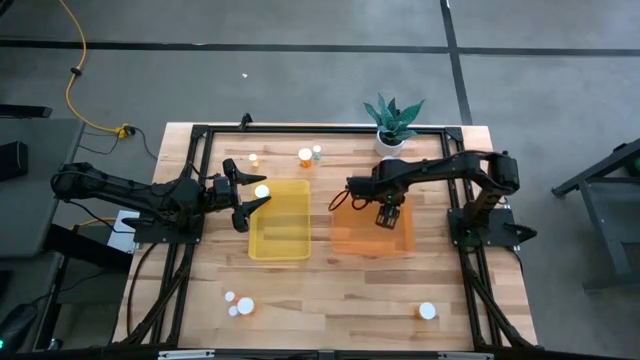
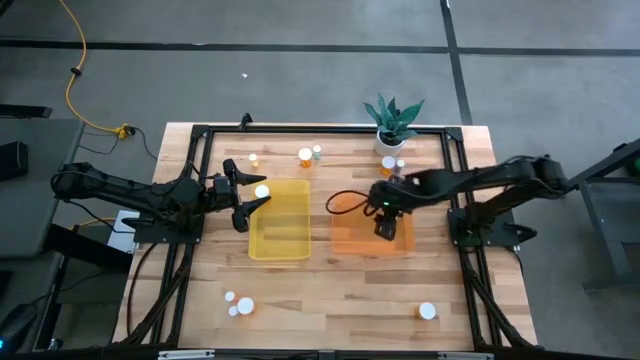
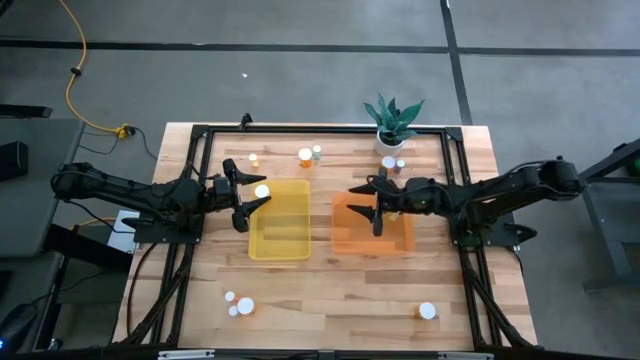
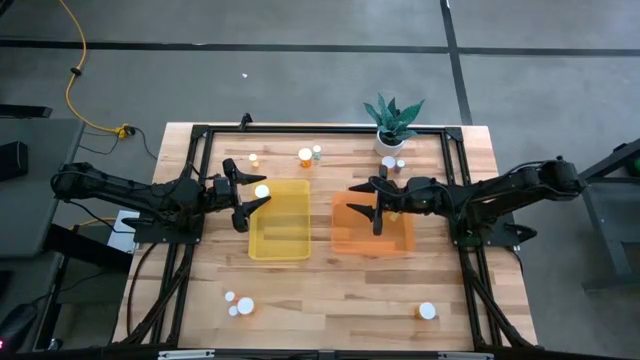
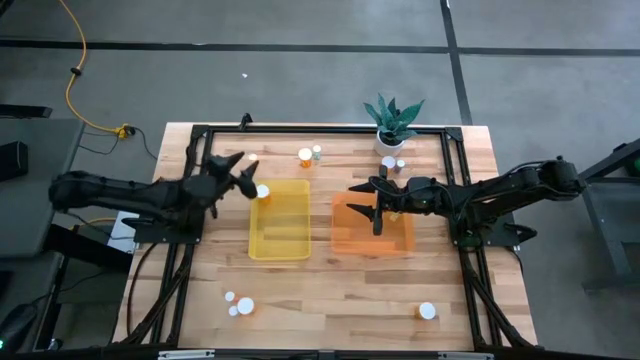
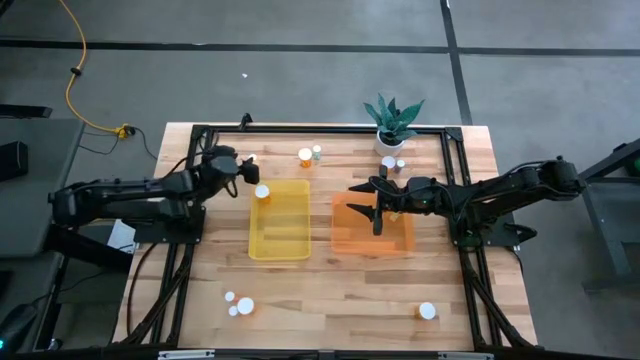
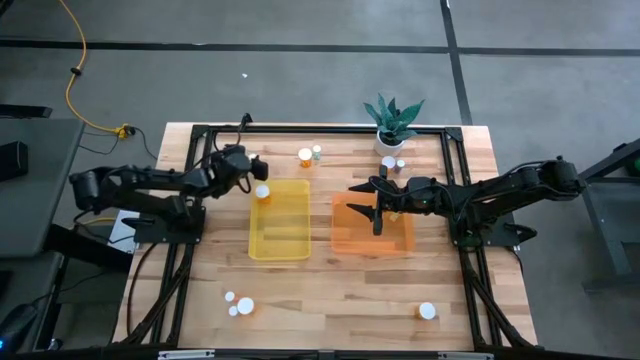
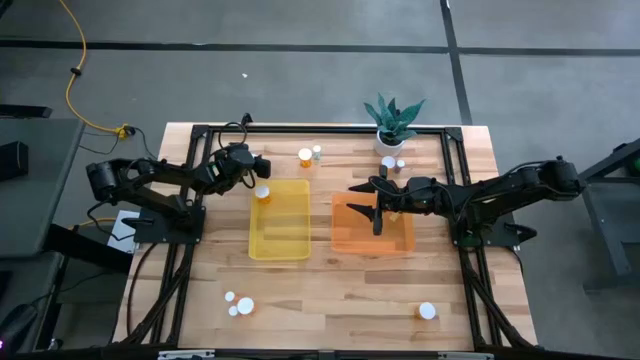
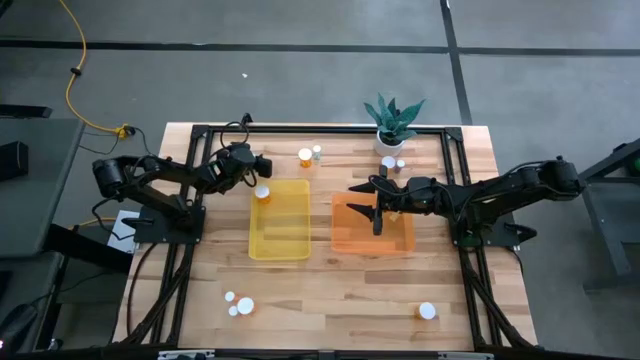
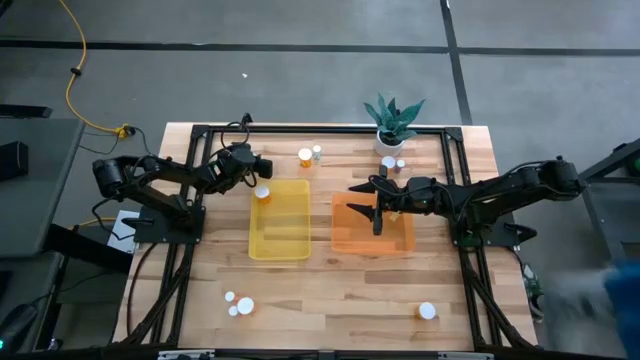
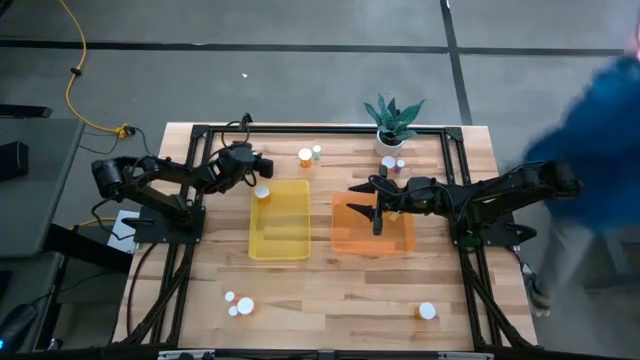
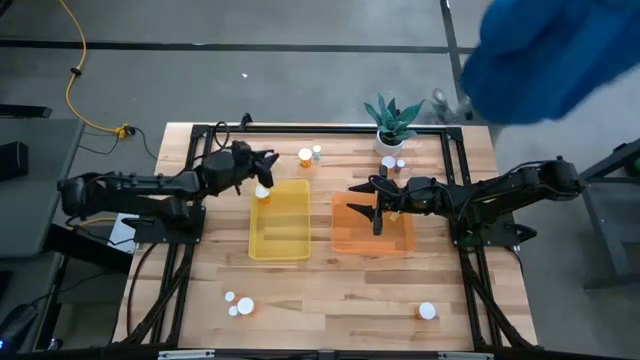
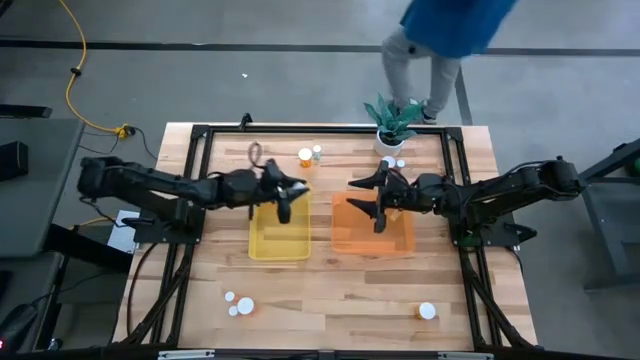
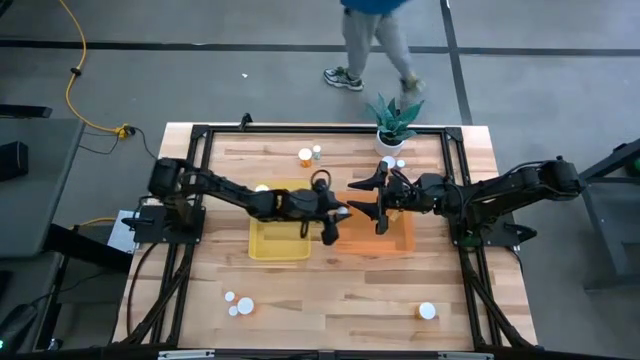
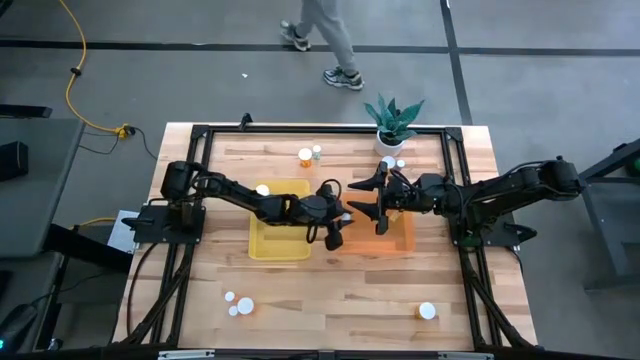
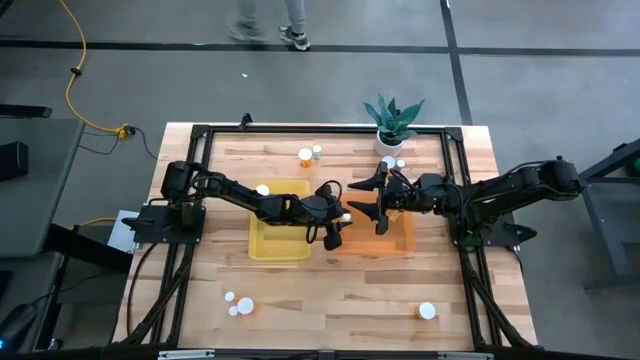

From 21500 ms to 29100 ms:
Task: Pick and place medicine bottles into bin by pill shape (circle, oval)
Put the small yellow tablet bottle into the orange bin

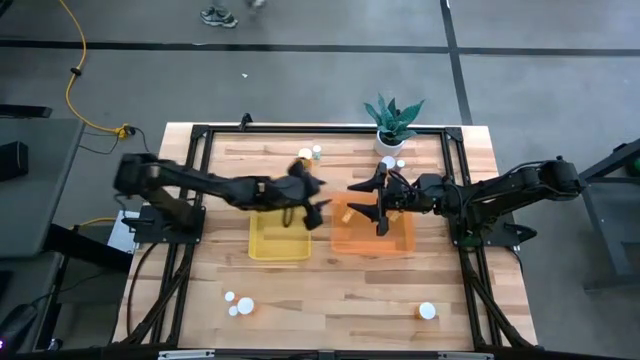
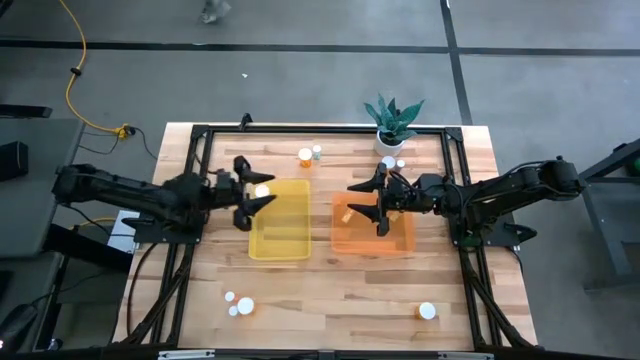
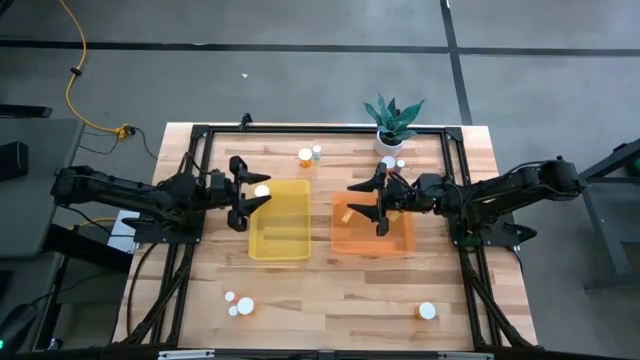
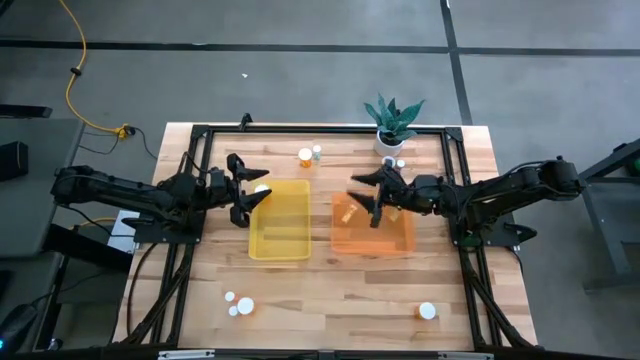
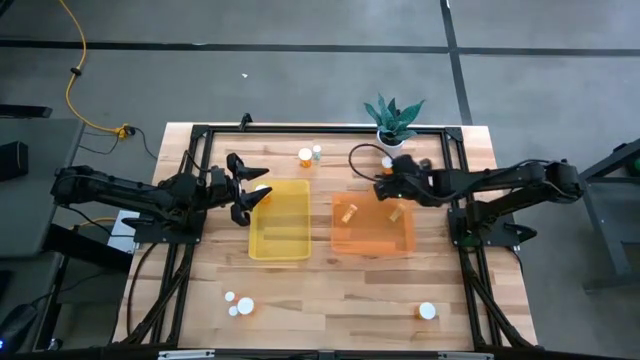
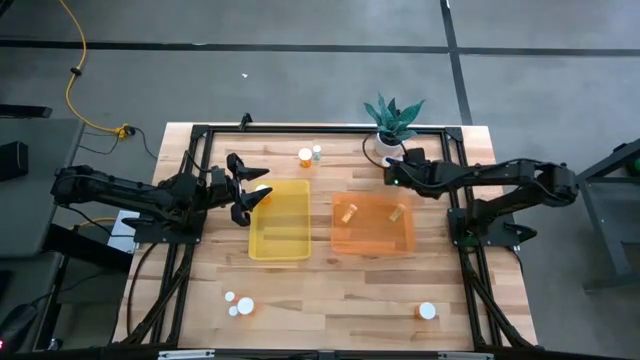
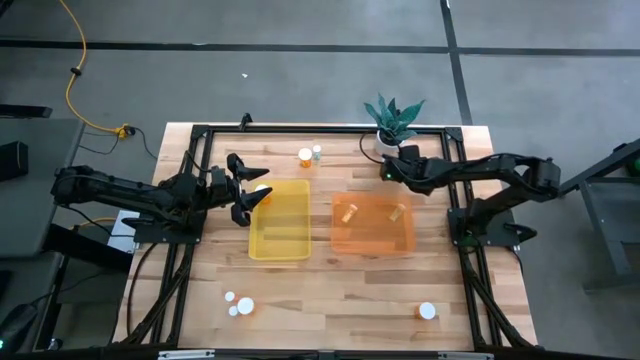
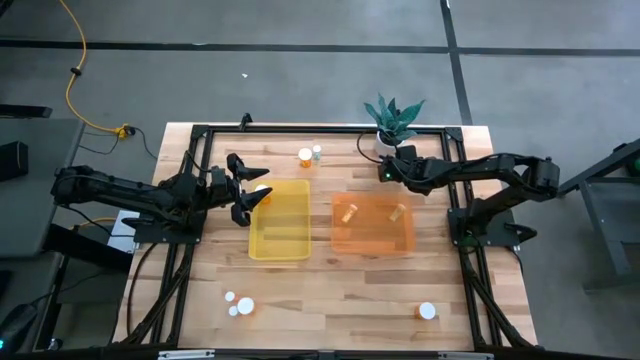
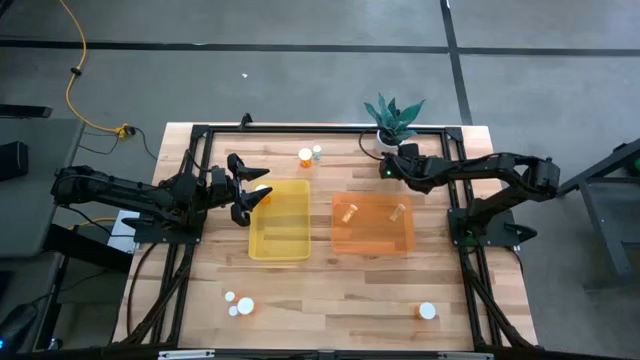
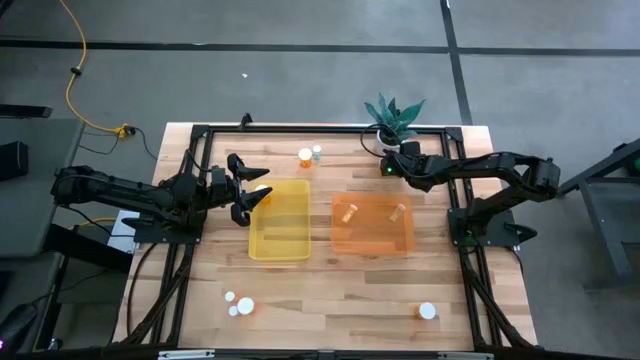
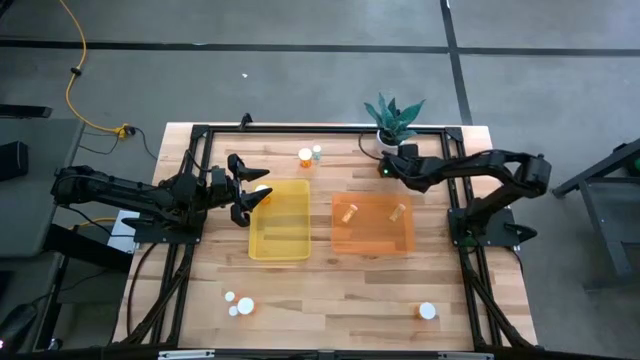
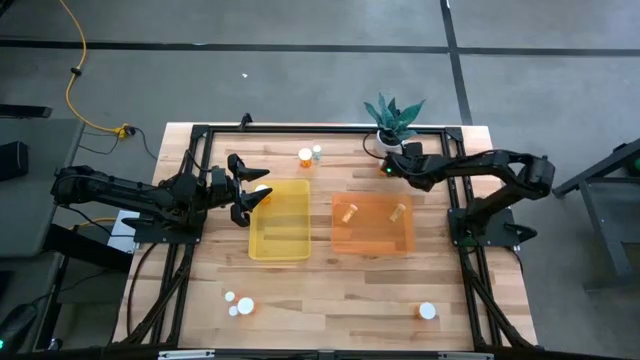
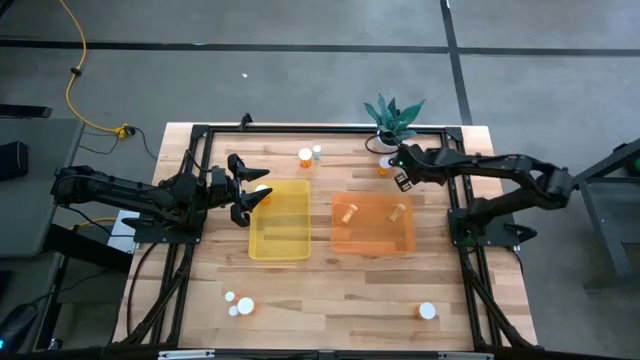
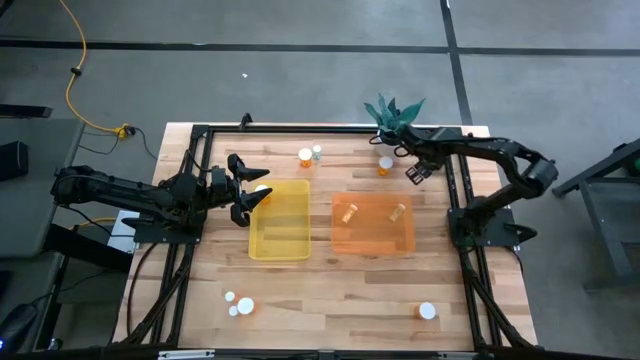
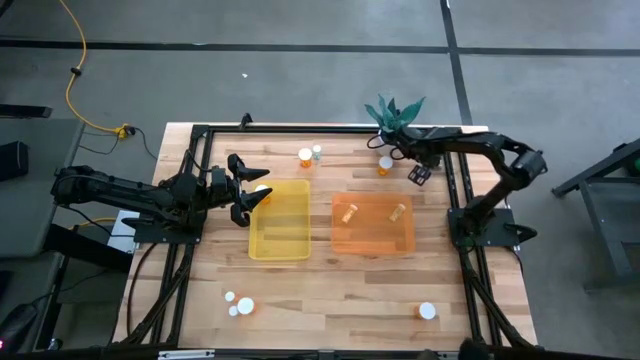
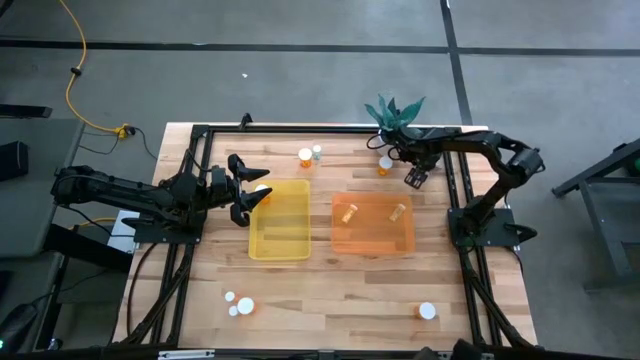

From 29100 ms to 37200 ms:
Put the small blue capsule bottle into the orange bin

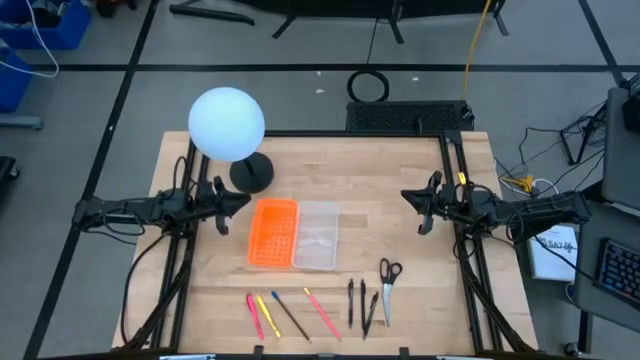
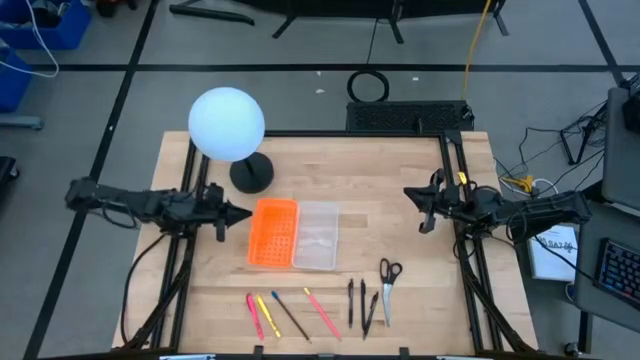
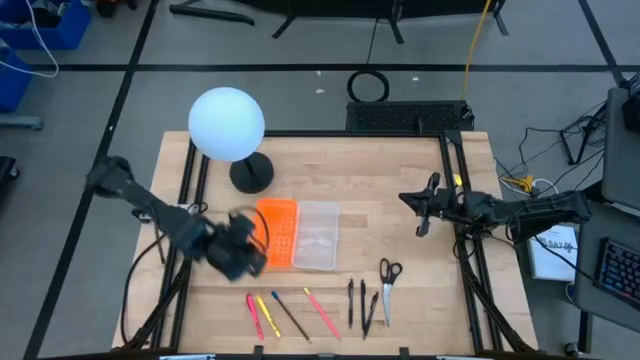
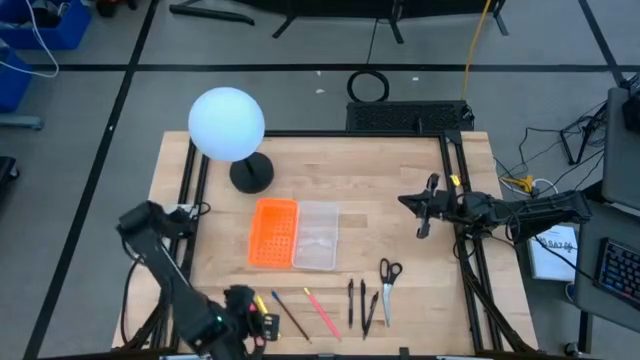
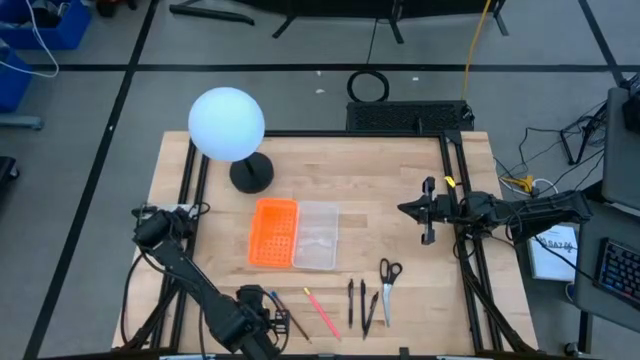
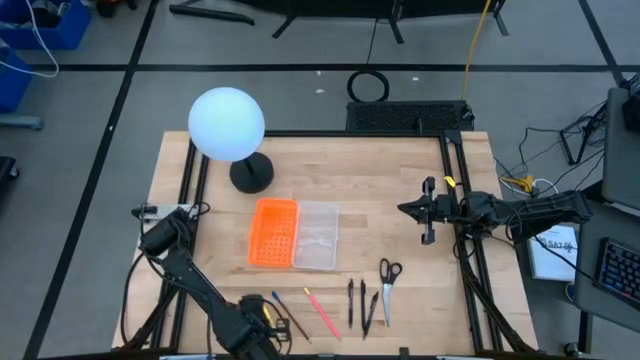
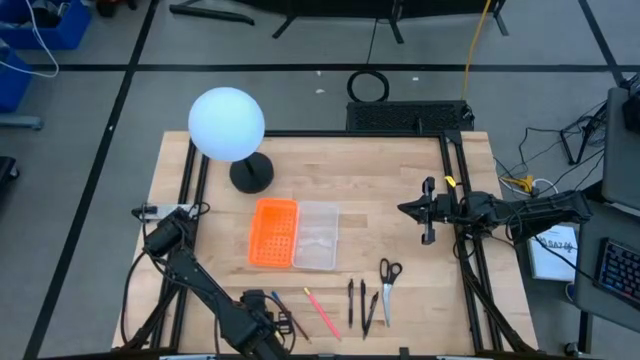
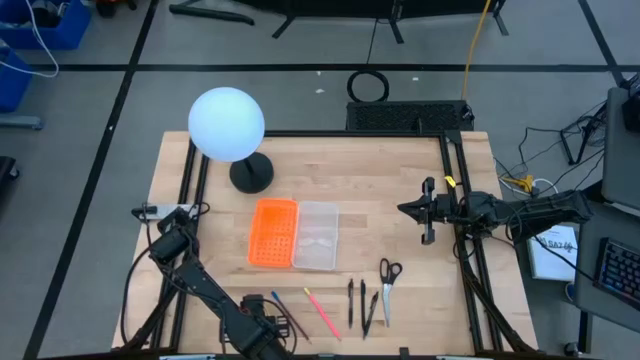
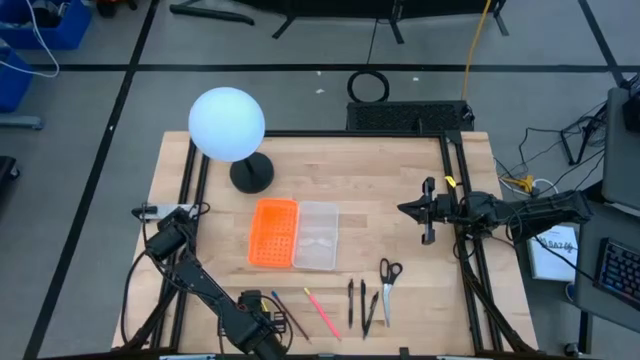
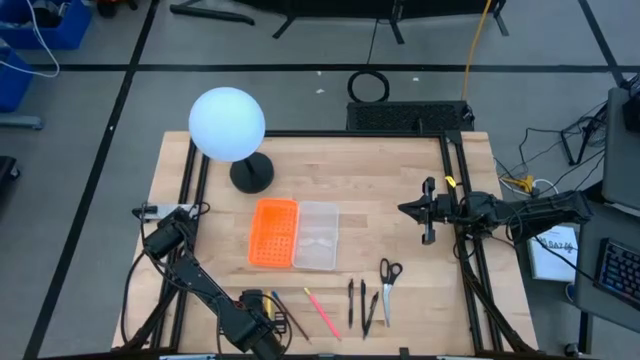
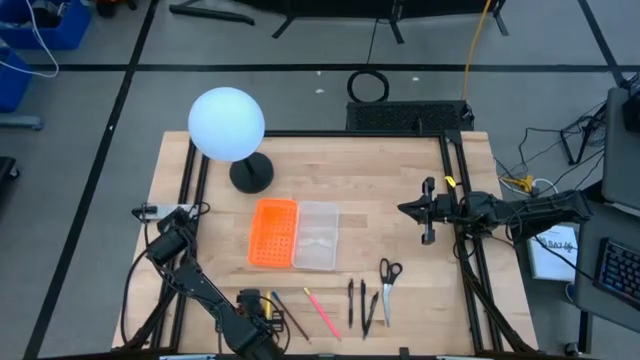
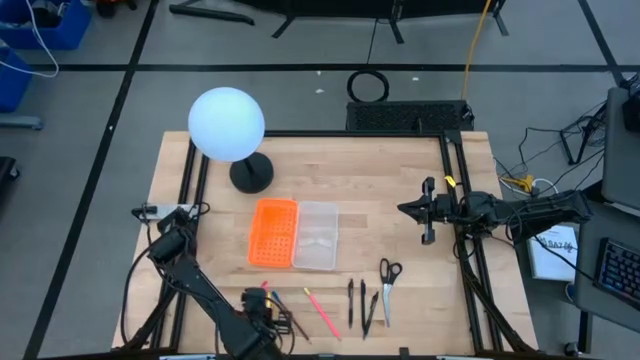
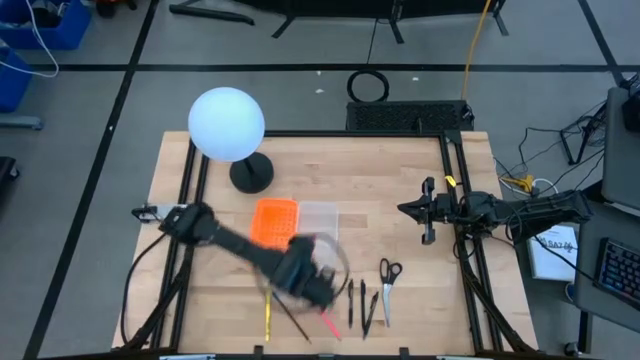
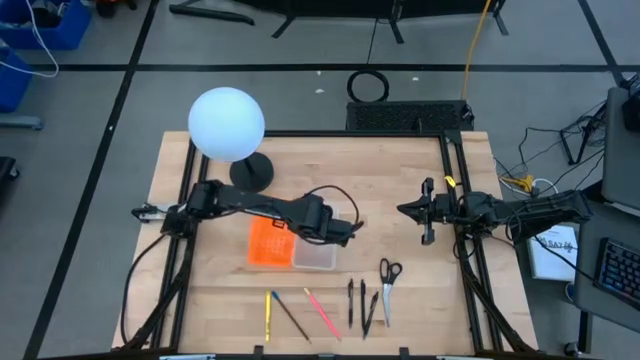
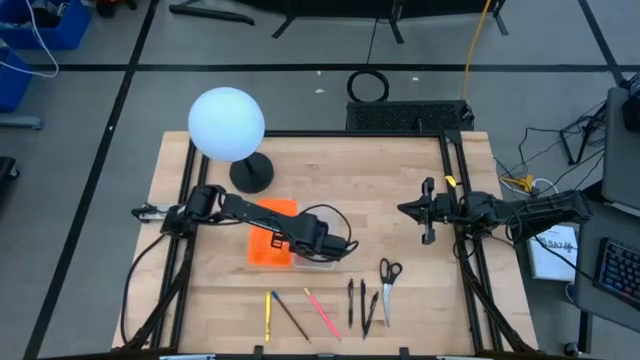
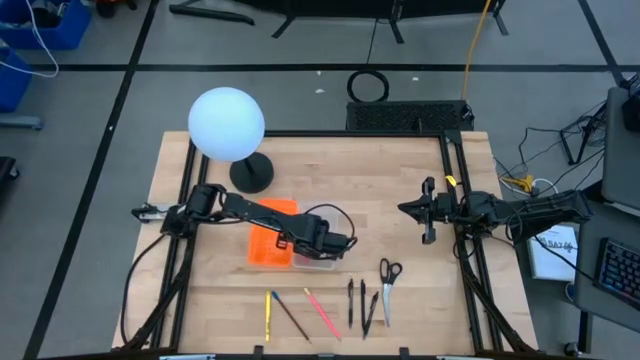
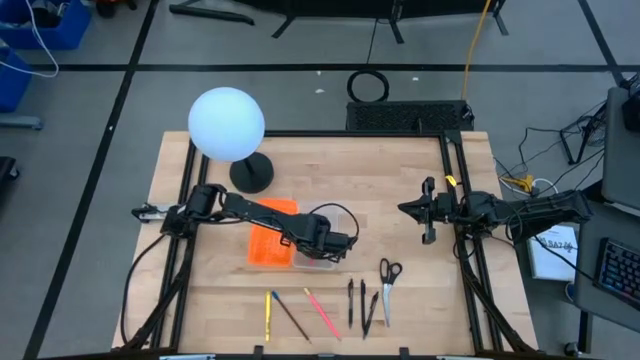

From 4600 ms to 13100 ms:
Task: Pick & place school supplies into a supply box
Put the left pink pen into the supply box
